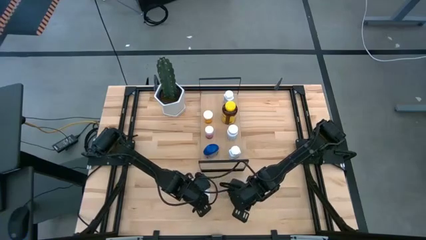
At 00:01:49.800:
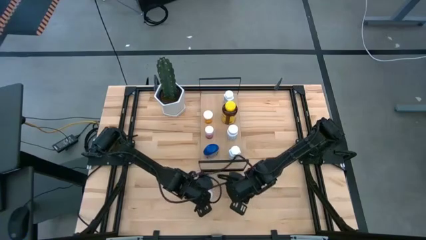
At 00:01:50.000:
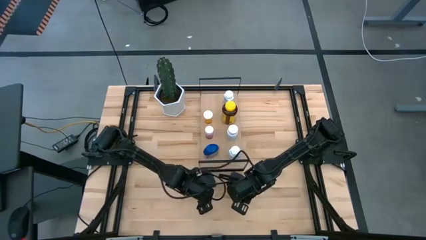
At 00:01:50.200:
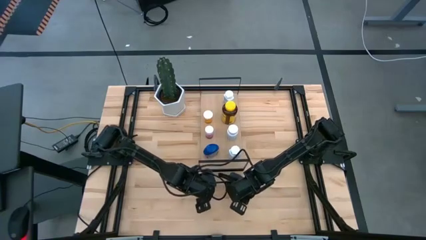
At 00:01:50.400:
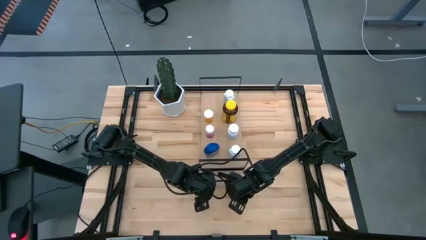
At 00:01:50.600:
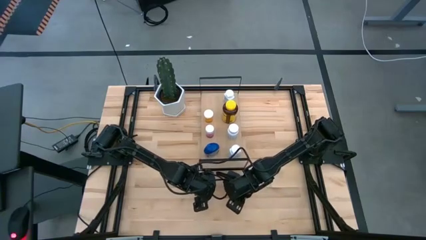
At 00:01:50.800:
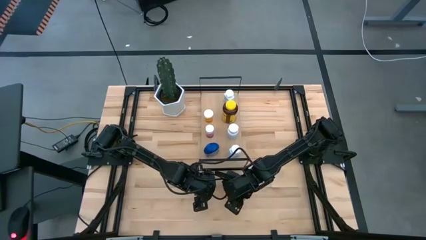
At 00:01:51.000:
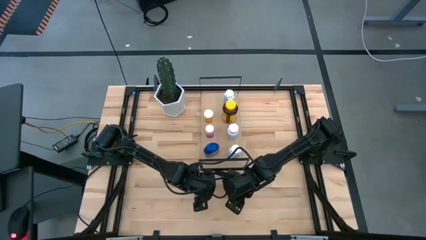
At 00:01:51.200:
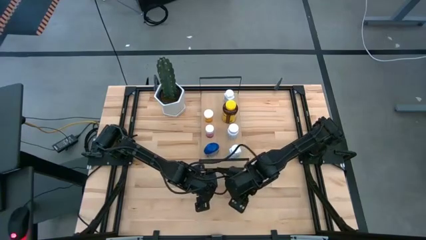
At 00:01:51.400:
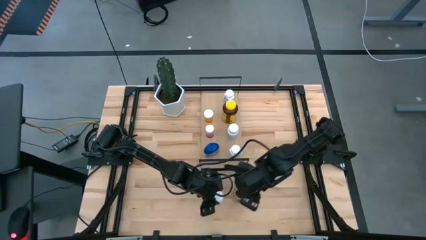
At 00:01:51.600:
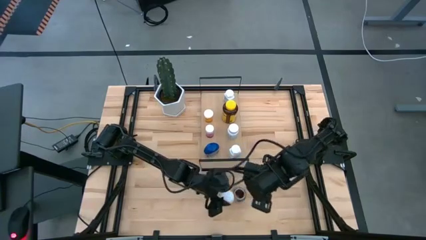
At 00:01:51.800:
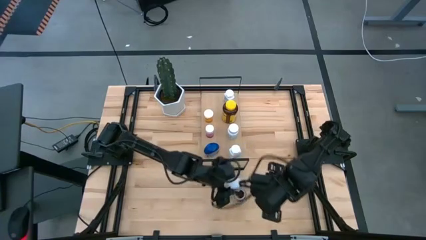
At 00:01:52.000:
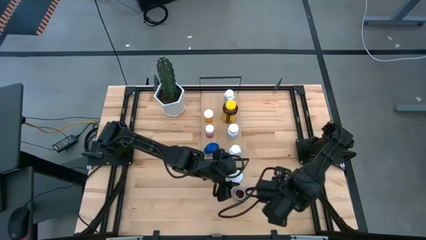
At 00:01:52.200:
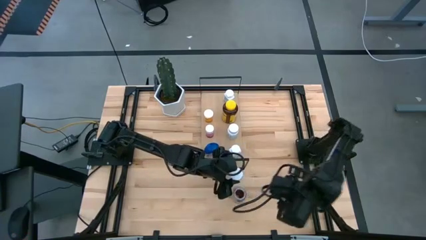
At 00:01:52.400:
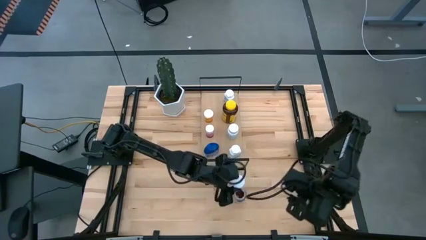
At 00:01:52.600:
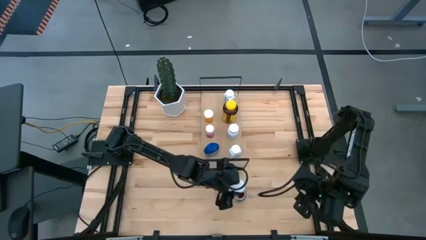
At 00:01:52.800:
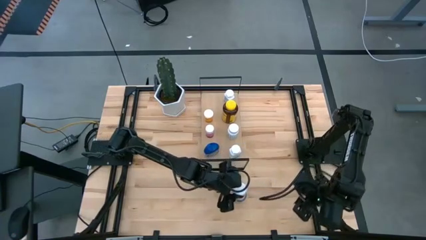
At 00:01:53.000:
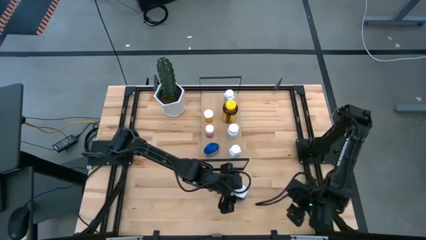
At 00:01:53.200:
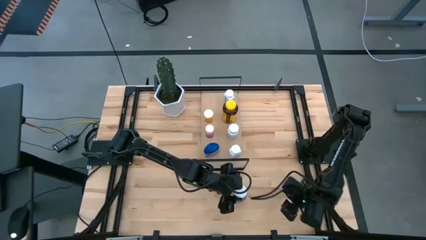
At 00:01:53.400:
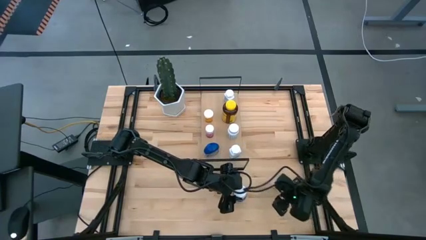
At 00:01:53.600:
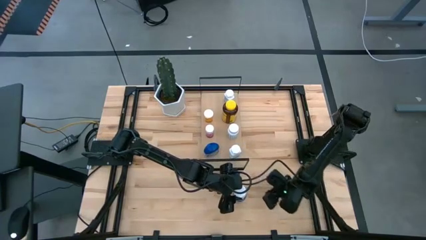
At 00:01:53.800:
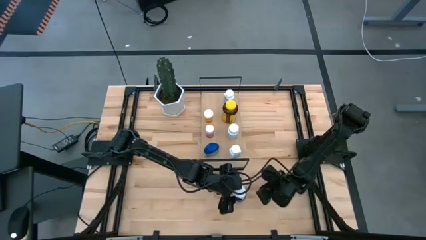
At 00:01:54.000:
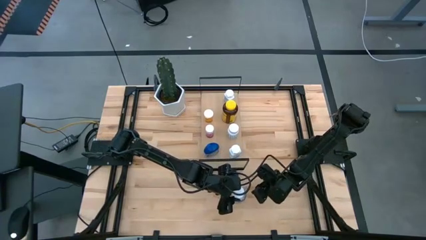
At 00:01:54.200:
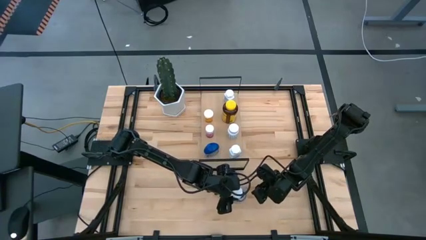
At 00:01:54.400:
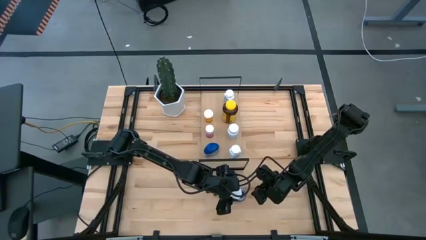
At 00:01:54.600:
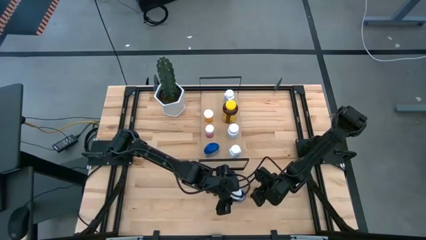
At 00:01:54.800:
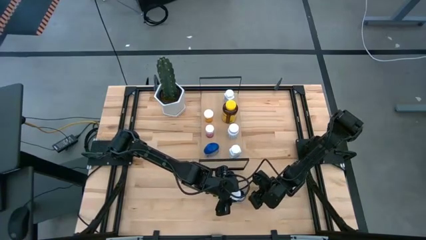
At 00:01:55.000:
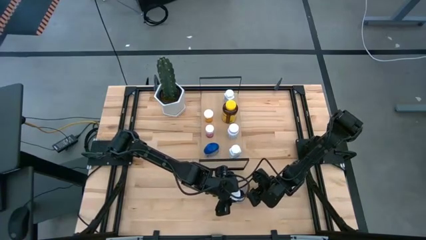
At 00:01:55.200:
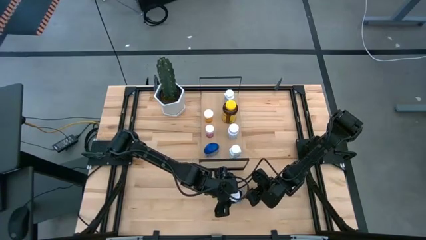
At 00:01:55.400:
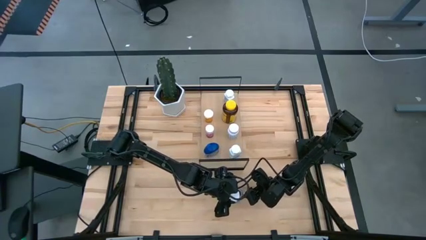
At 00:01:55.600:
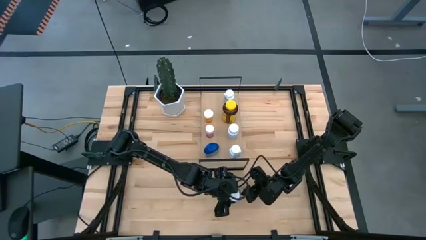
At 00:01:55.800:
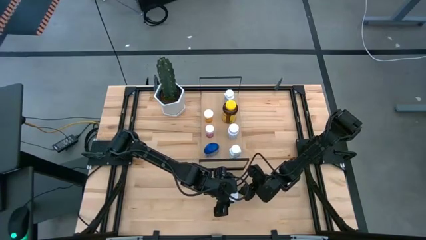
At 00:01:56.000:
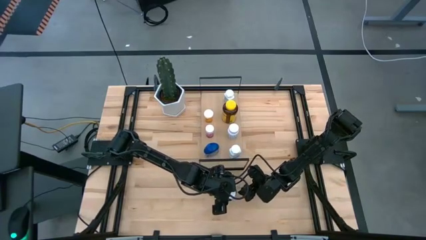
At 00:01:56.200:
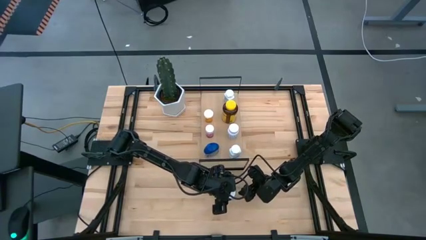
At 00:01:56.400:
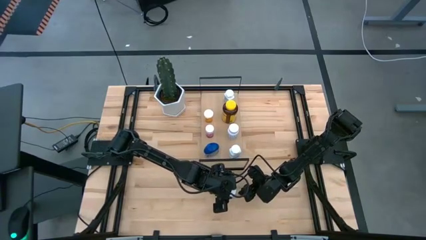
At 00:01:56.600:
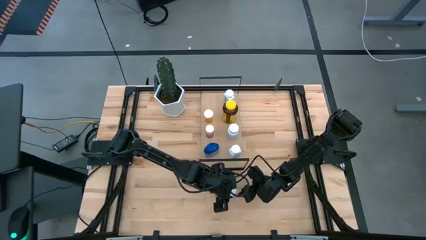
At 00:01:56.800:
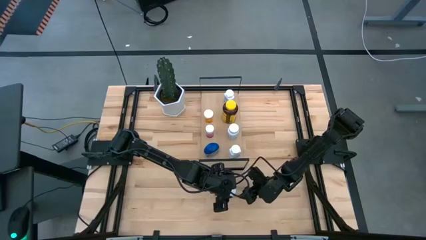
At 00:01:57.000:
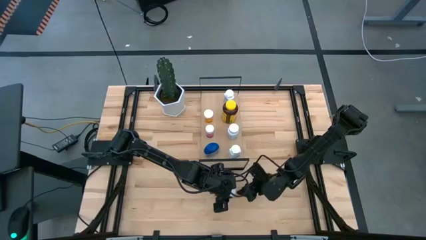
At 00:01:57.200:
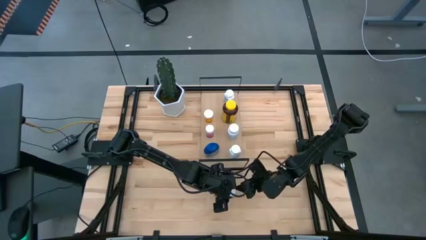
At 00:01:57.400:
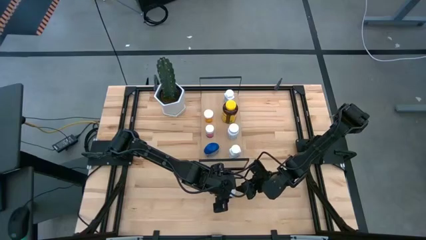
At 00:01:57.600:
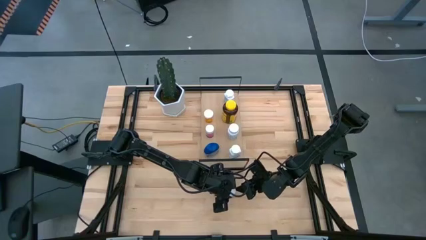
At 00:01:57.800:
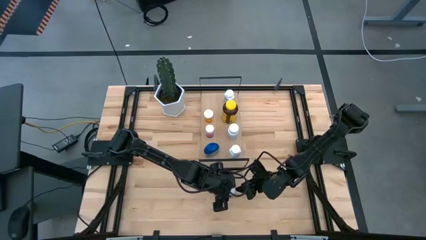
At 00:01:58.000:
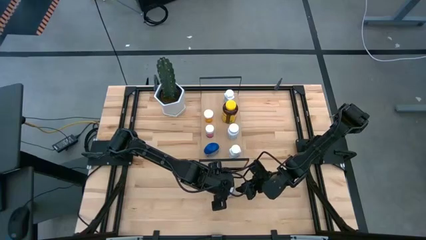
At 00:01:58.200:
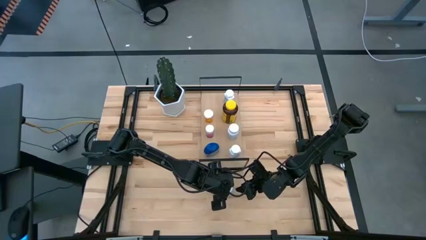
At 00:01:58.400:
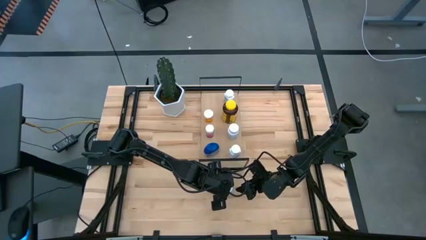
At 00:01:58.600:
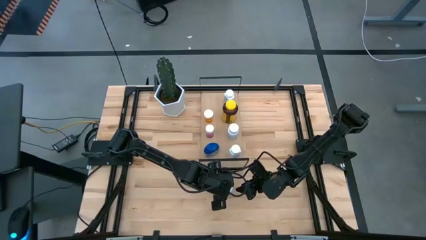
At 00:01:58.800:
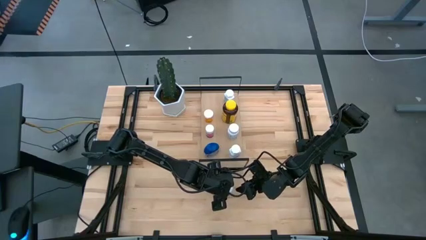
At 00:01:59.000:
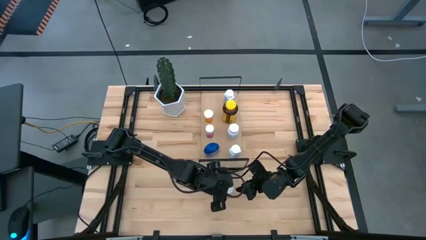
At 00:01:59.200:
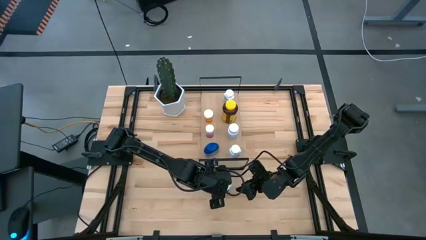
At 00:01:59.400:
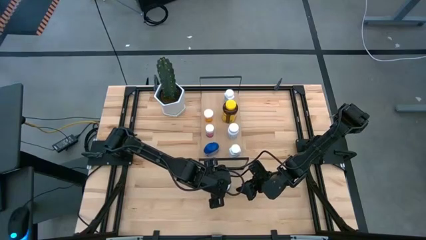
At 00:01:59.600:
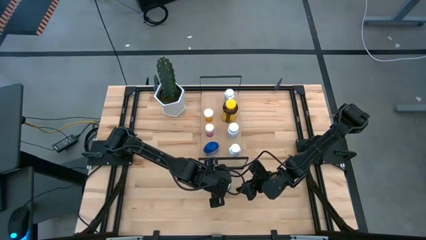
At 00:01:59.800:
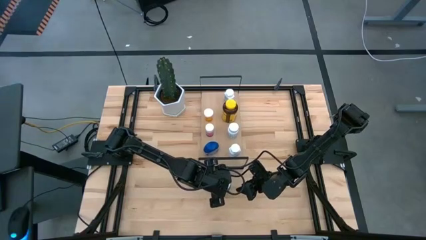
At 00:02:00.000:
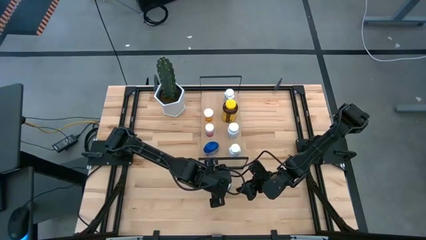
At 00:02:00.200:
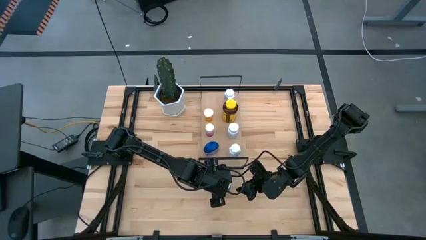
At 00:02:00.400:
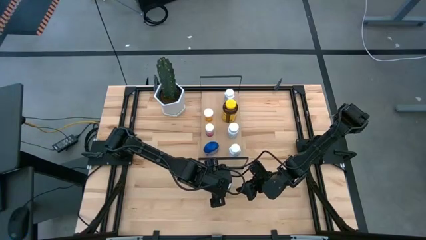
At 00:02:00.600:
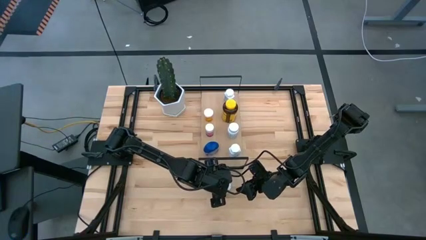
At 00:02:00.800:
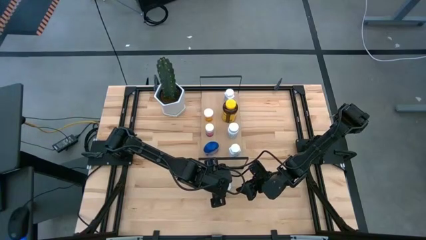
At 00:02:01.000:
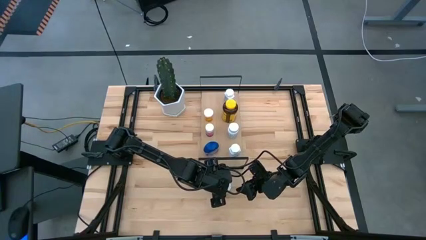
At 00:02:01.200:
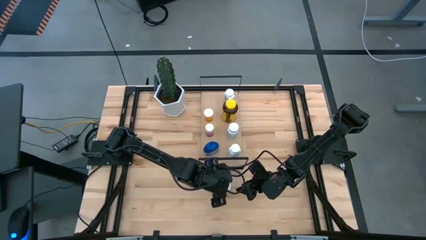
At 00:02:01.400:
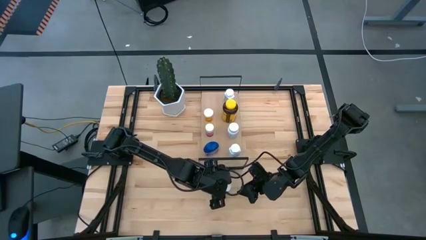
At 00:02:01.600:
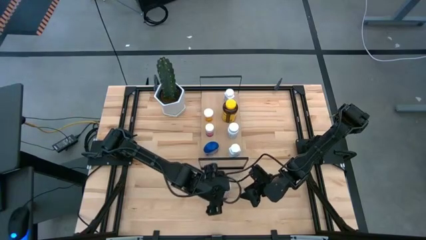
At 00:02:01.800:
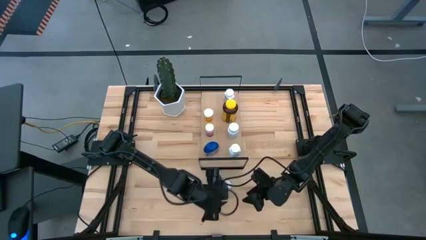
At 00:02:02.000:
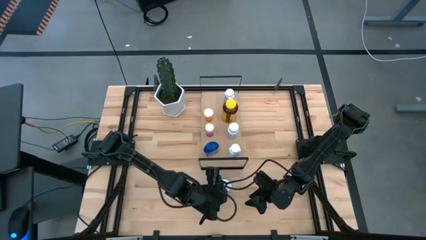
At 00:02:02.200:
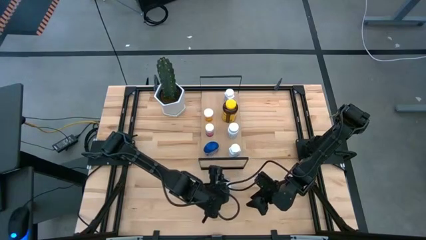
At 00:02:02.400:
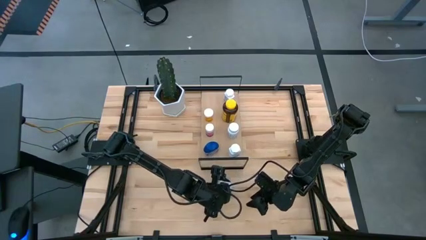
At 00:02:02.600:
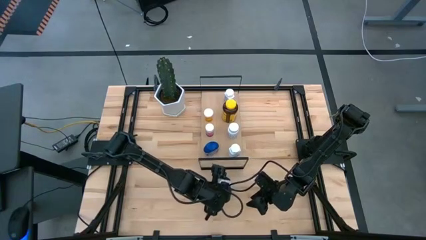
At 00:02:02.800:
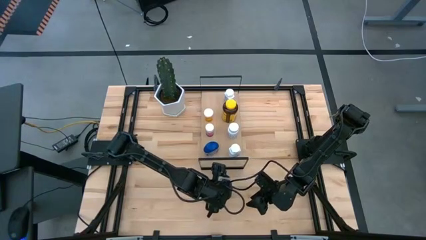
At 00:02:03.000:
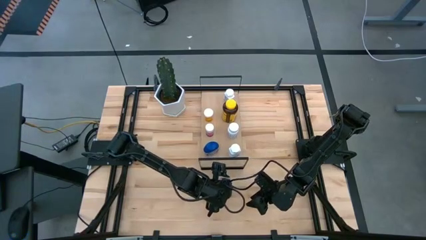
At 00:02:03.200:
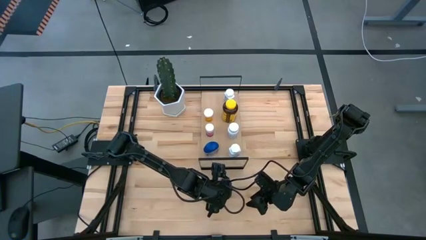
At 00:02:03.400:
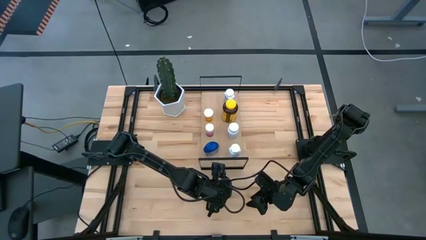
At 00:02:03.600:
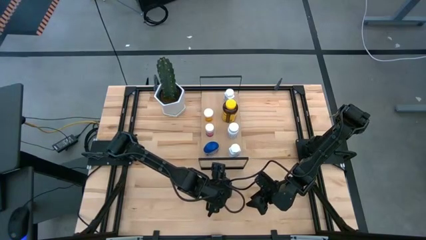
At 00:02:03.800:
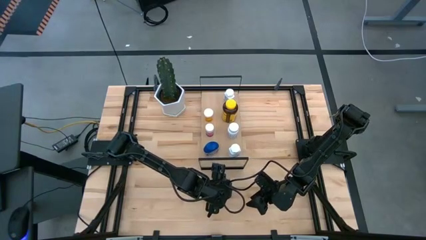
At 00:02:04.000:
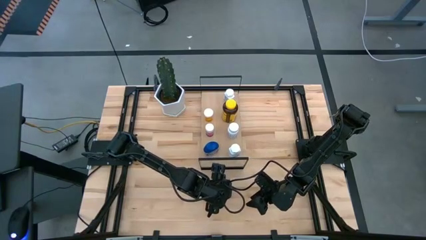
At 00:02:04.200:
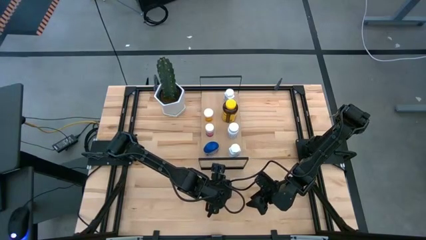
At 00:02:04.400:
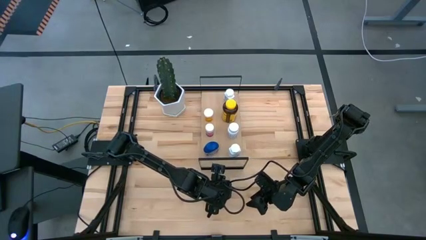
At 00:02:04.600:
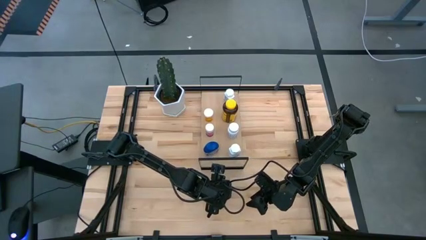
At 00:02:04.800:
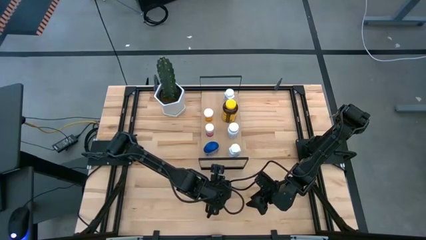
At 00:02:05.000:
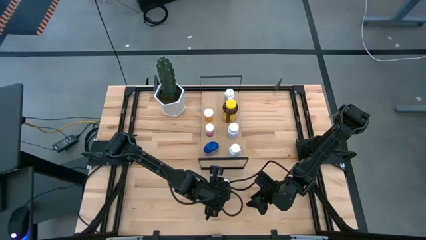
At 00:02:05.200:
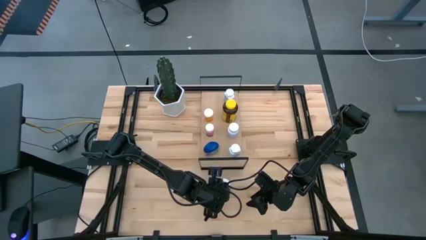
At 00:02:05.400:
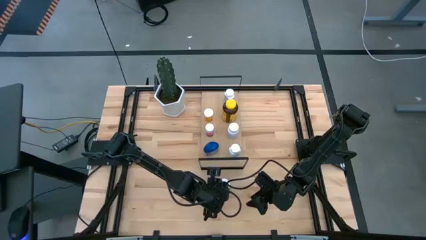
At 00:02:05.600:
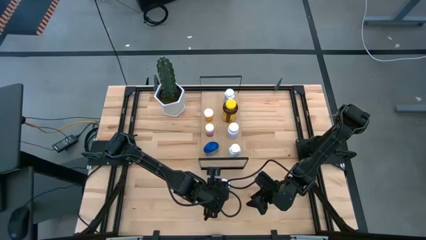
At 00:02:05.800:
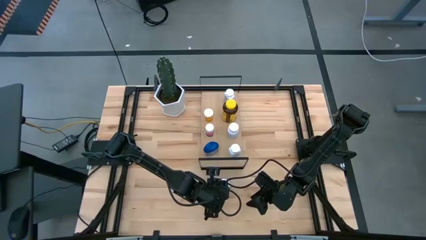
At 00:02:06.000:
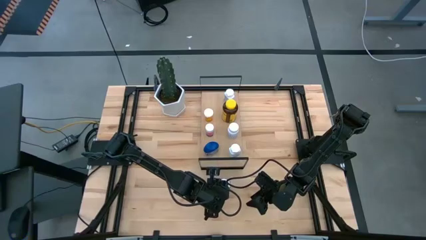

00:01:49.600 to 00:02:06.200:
Task: Pick and place medicine bottles onto shelf by color
Close the lid of the green medicine bottle
